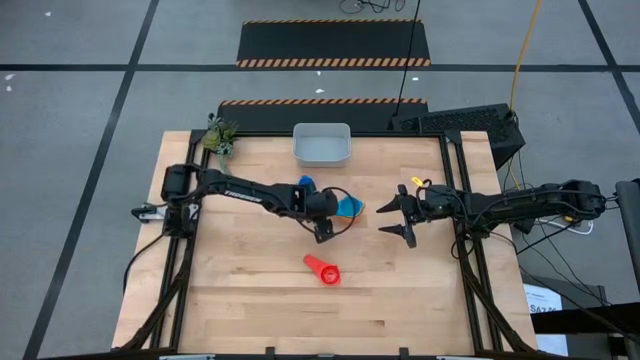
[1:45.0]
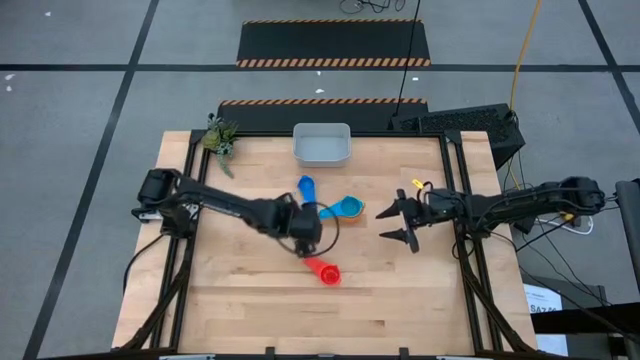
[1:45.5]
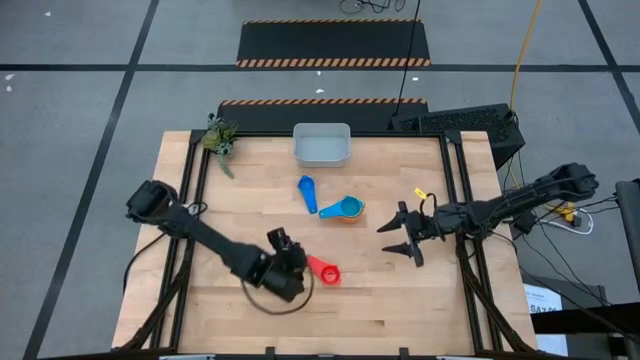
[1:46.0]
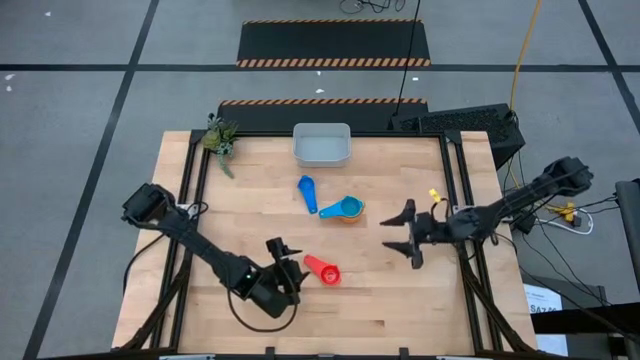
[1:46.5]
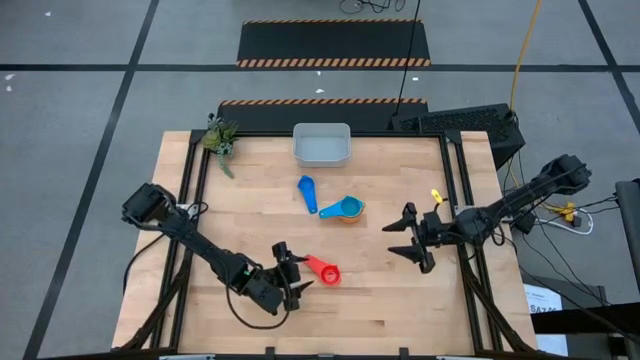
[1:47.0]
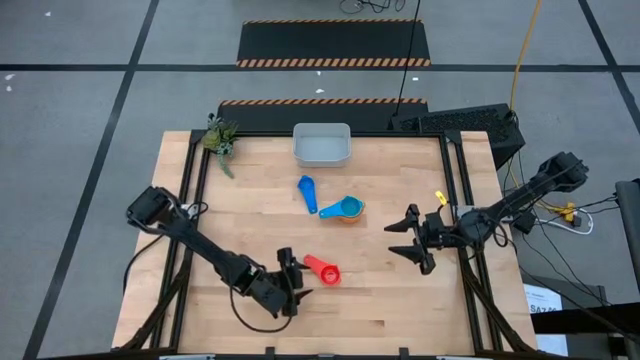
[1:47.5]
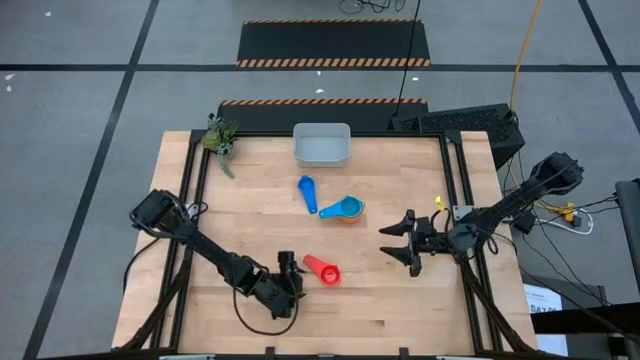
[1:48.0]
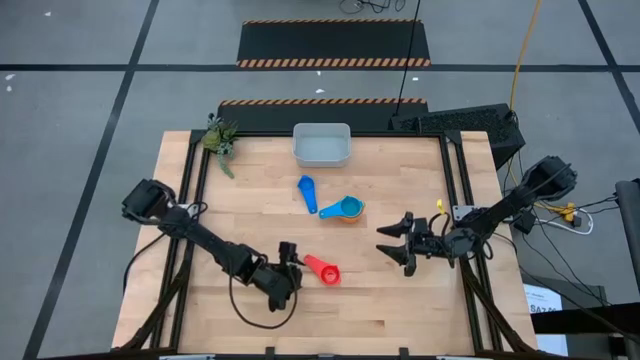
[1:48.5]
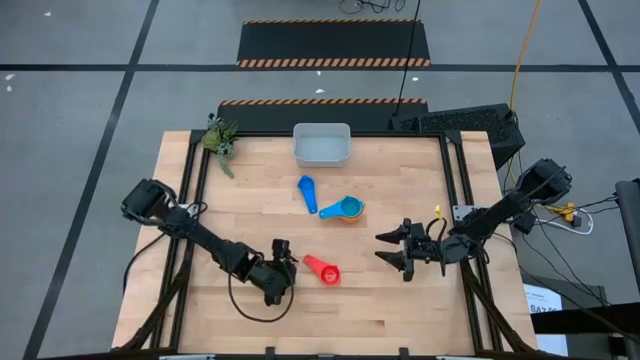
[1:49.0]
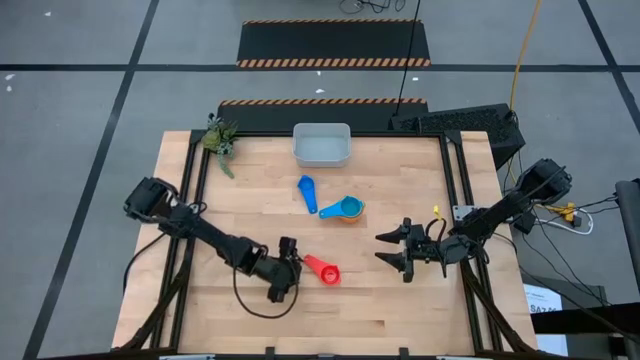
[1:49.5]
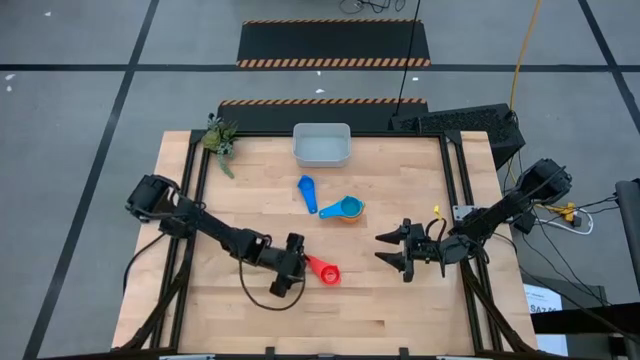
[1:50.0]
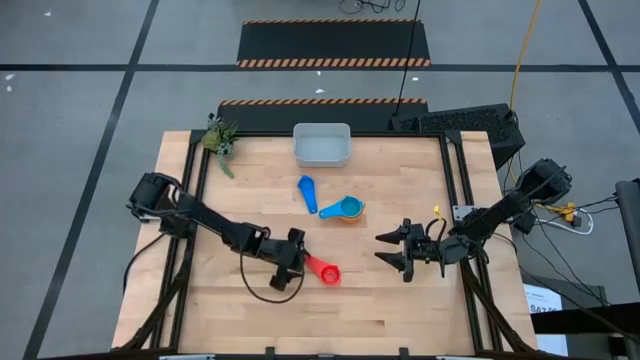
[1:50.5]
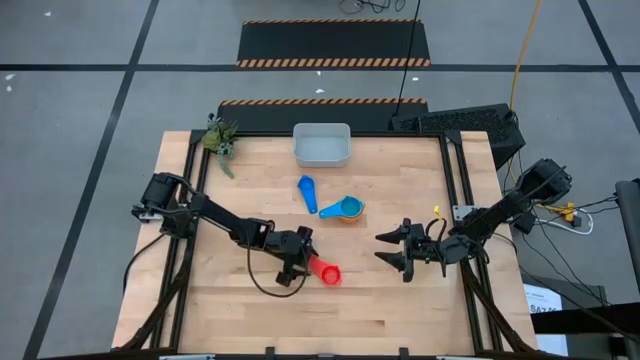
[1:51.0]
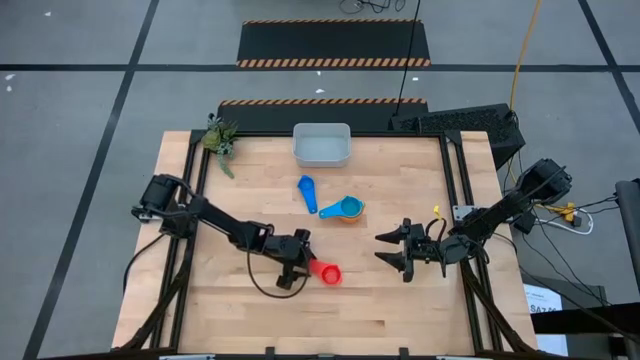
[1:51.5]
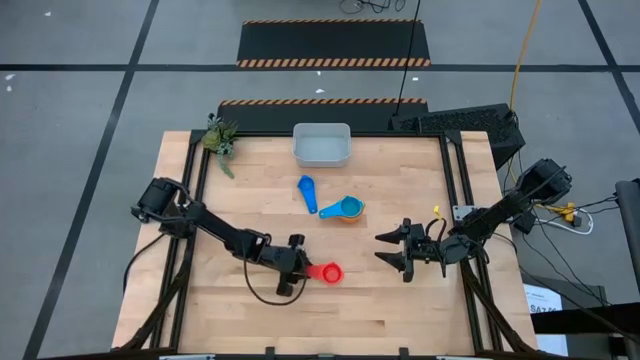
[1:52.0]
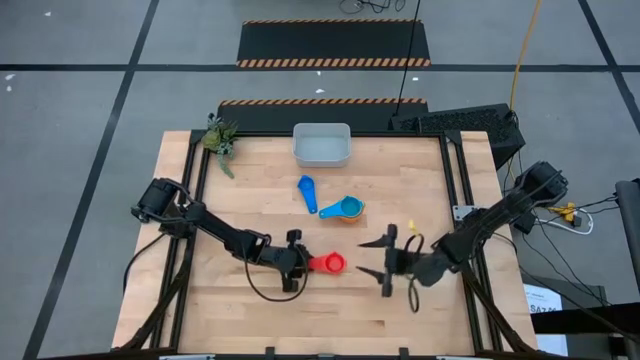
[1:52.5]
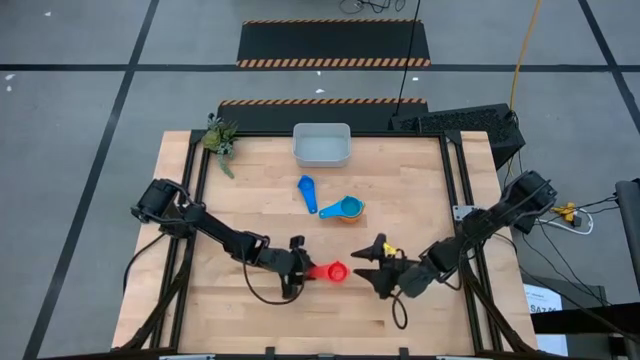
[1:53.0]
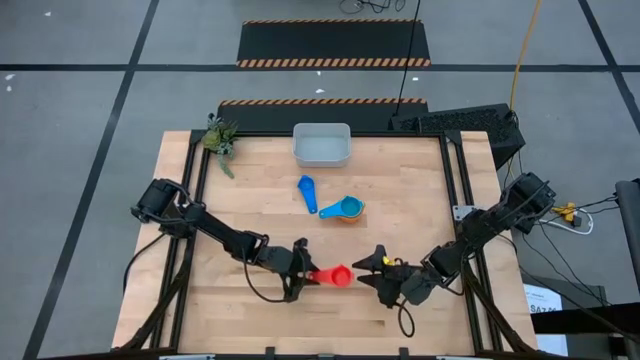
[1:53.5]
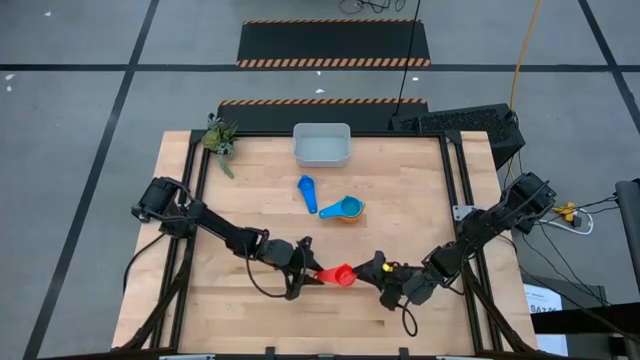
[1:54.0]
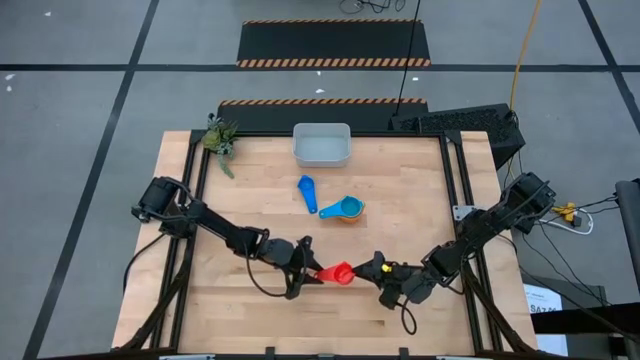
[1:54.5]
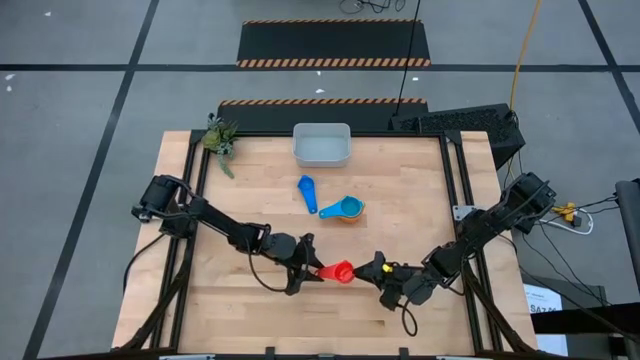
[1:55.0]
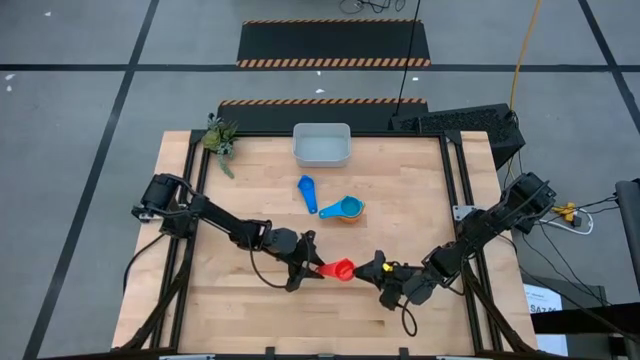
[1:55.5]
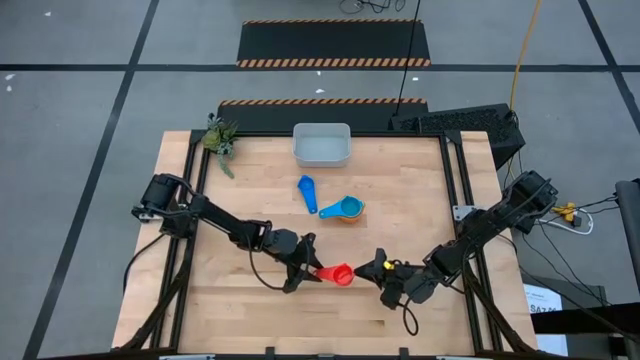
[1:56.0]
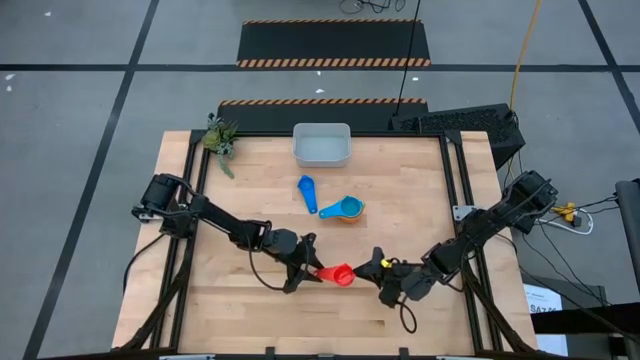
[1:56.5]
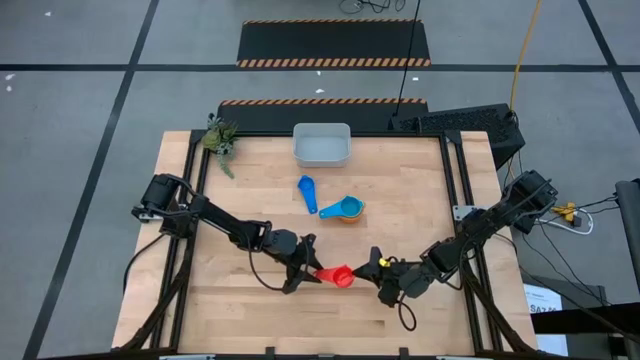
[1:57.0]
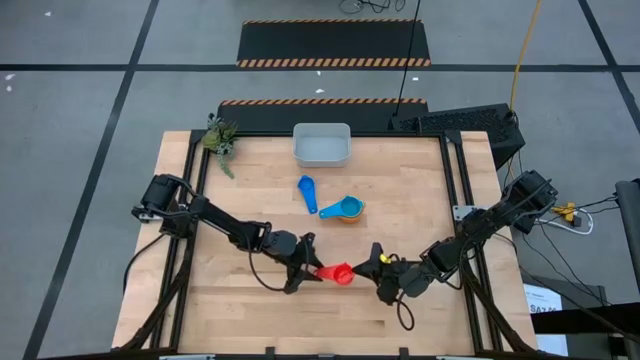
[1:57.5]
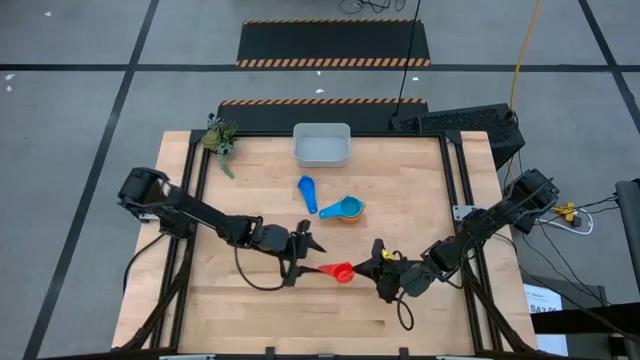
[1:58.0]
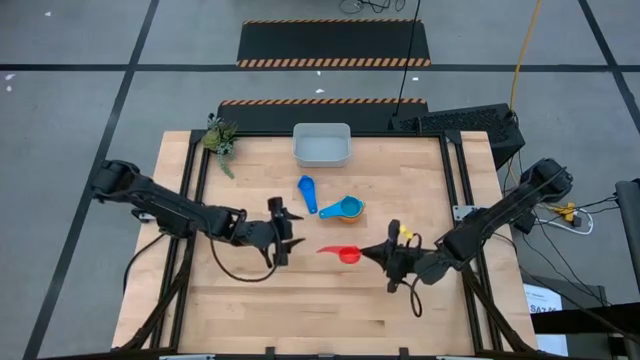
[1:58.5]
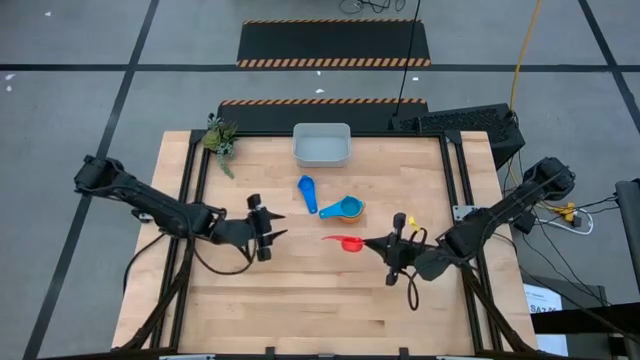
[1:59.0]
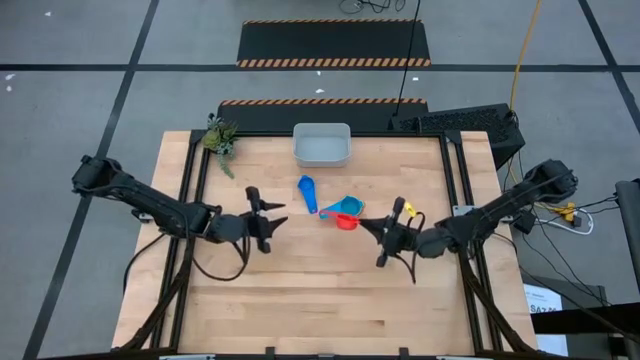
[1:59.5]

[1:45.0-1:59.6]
Task: Nest measuring cups in basket
Stack the red measuring cup into the light blue measuring cup

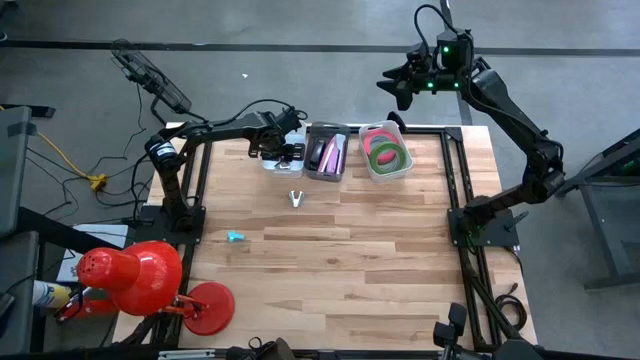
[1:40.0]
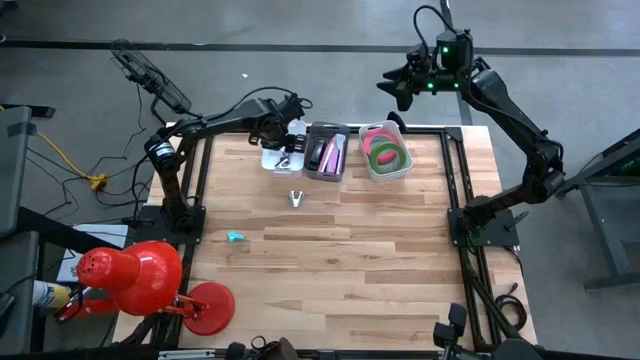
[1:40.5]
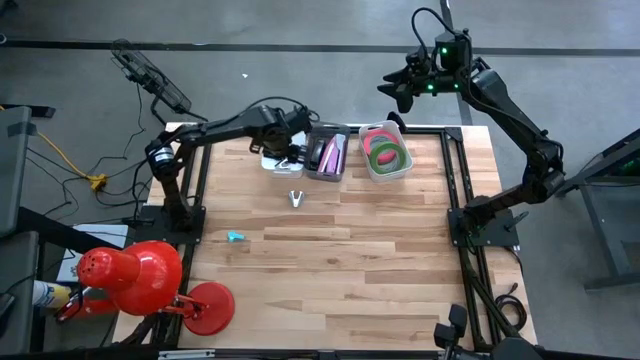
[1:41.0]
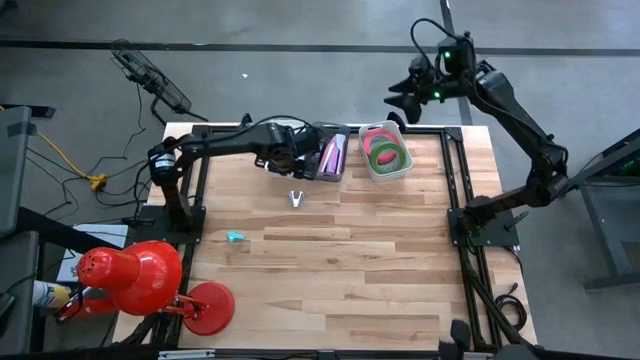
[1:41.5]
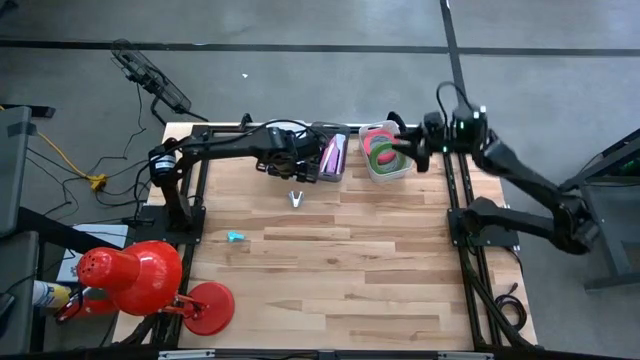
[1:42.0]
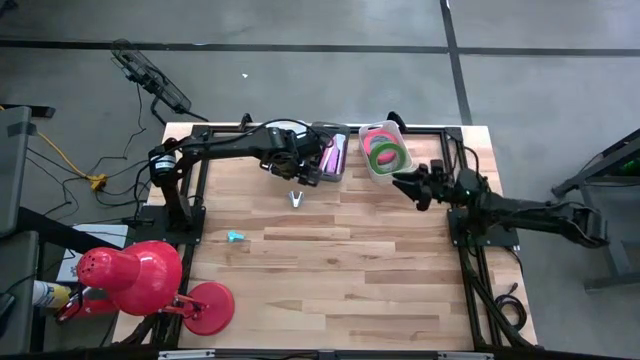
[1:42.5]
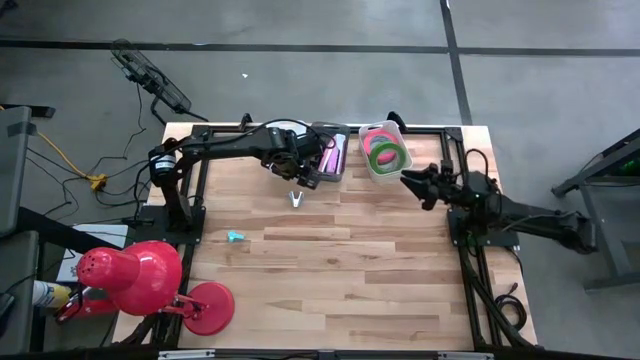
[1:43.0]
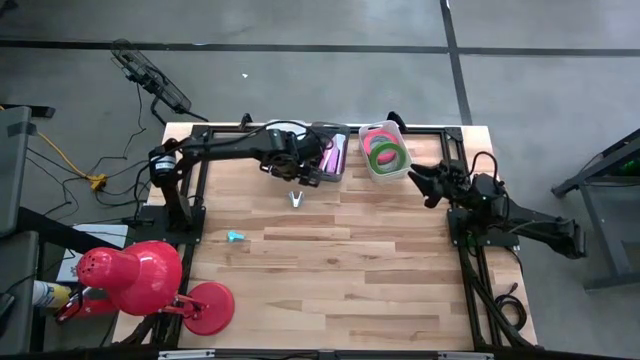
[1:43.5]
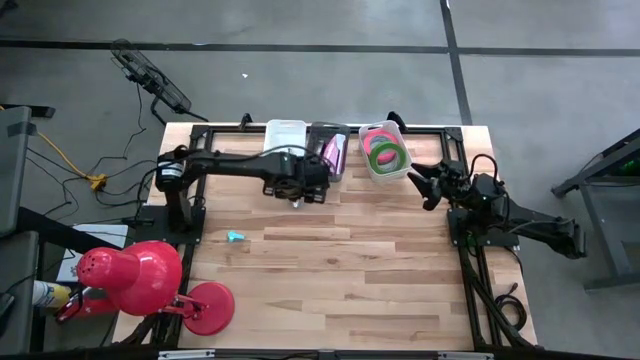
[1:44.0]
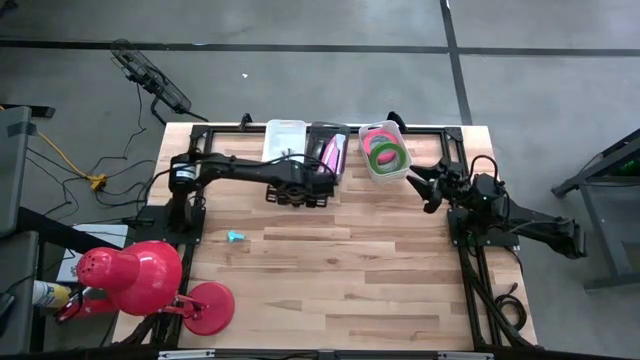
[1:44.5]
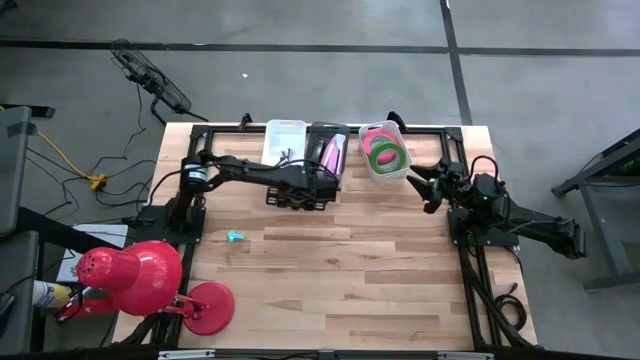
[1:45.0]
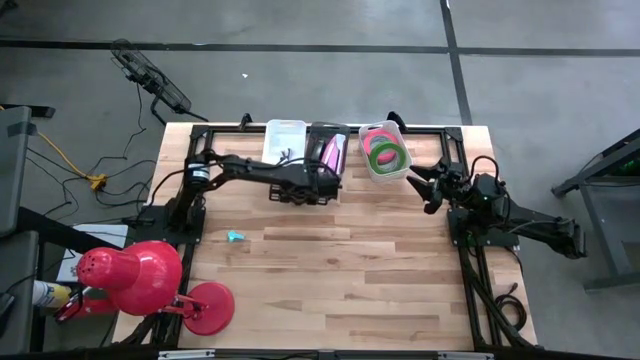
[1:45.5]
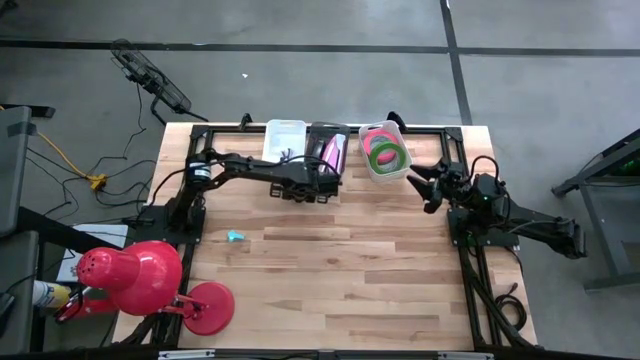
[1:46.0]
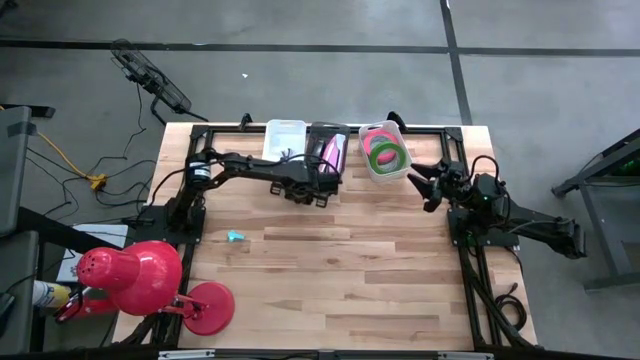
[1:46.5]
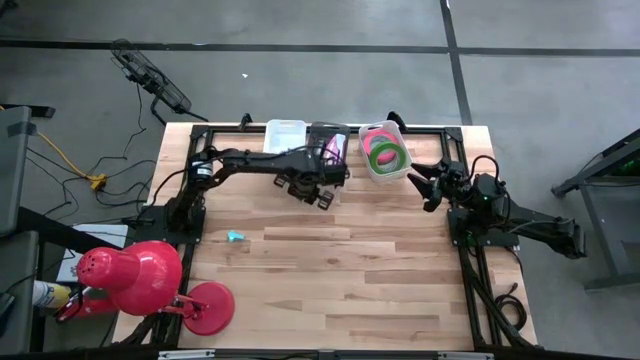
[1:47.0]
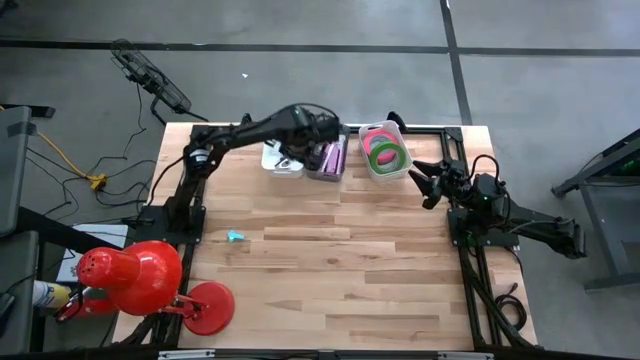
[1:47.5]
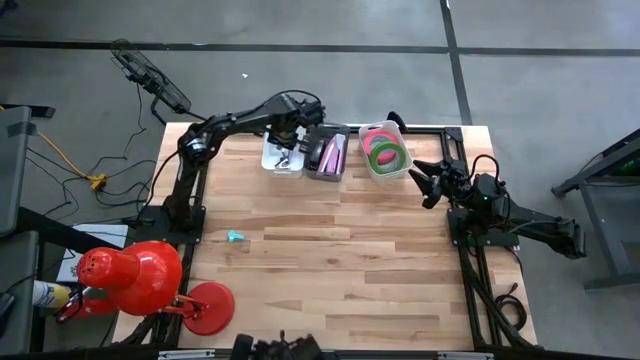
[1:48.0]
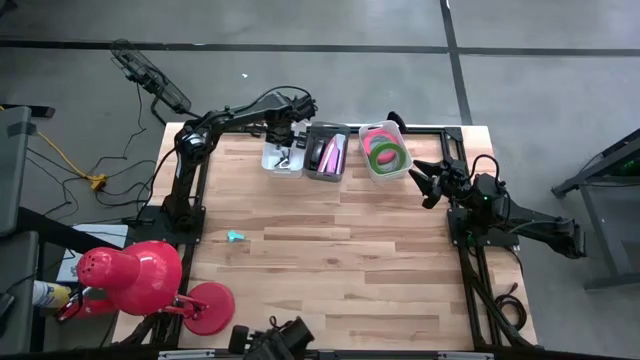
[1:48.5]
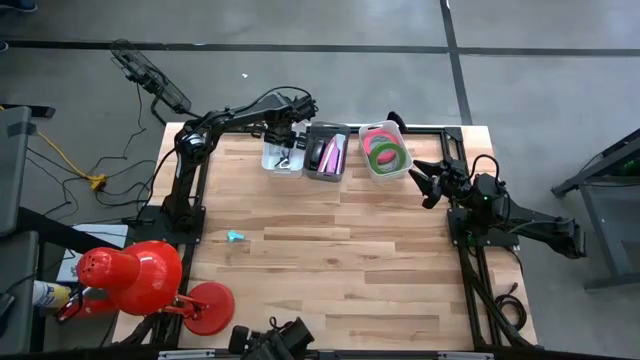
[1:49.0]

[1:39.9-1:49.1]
Task: Pick and place Stapler, Stapler remover, tape
Put the top blue staple remover into the left white bin
